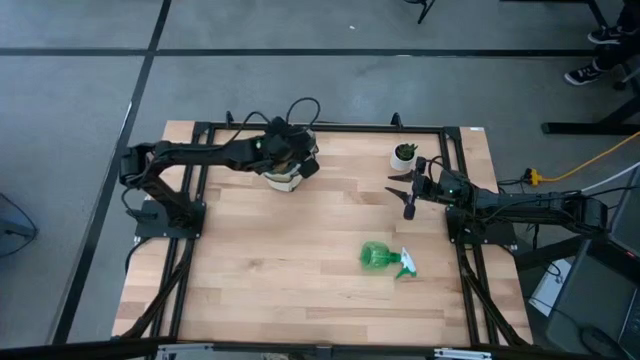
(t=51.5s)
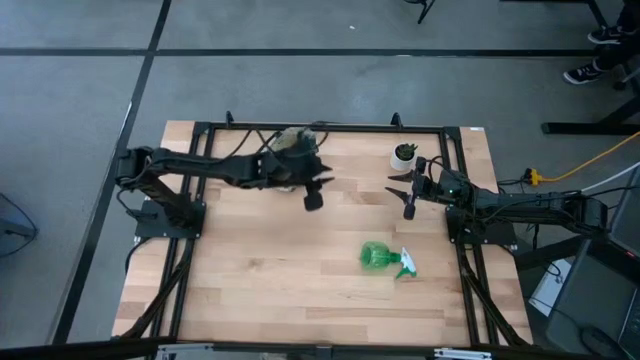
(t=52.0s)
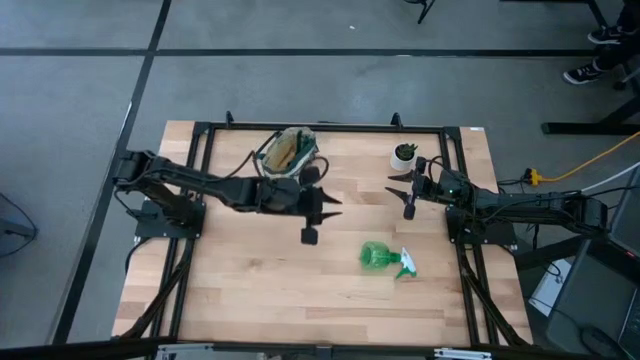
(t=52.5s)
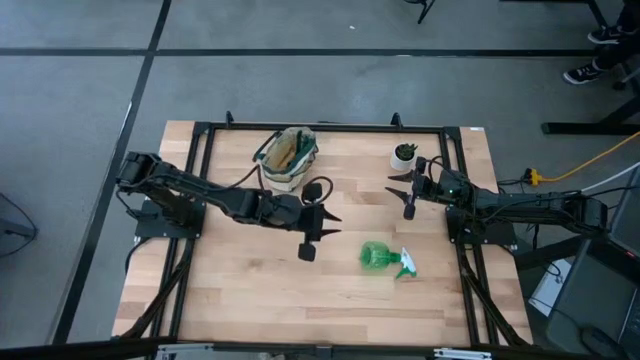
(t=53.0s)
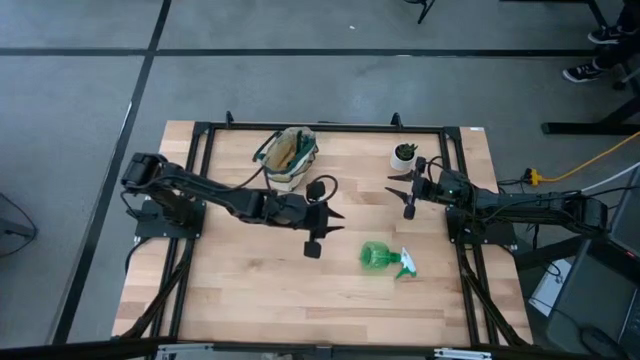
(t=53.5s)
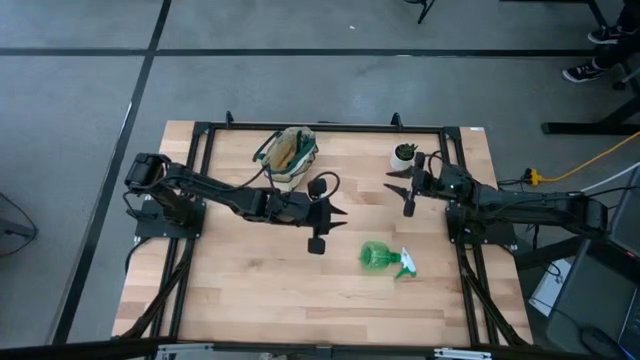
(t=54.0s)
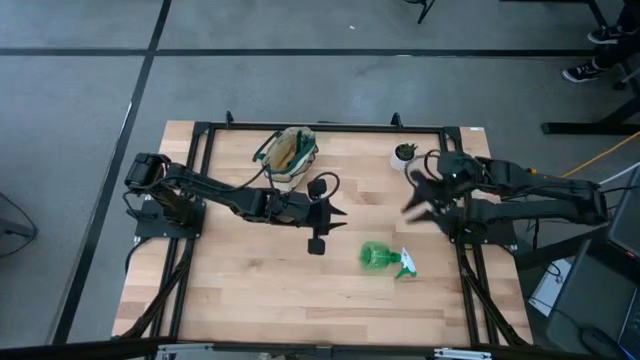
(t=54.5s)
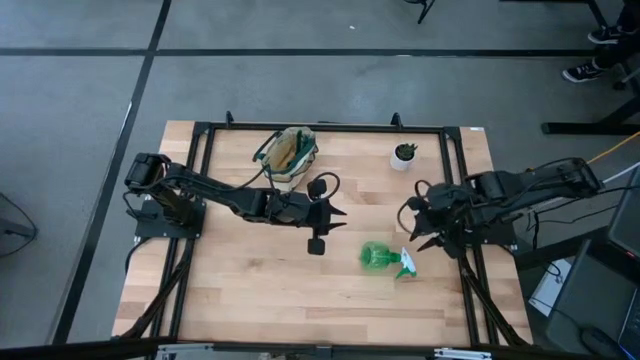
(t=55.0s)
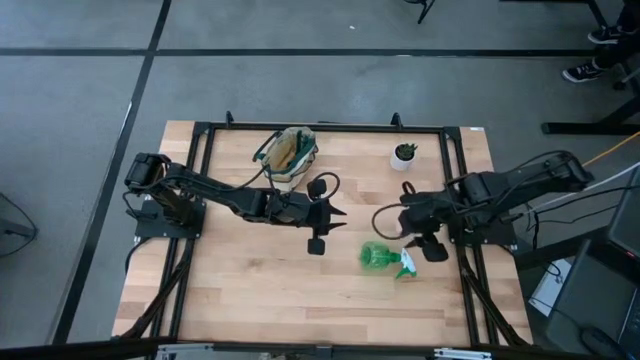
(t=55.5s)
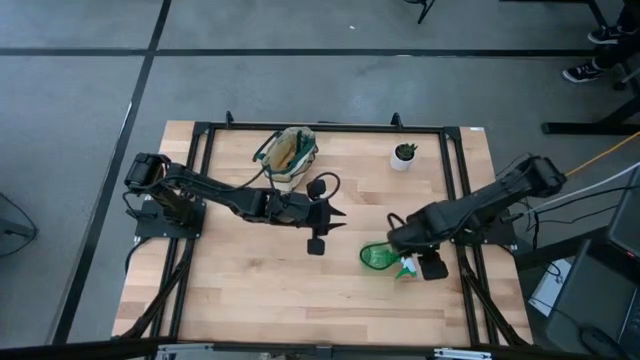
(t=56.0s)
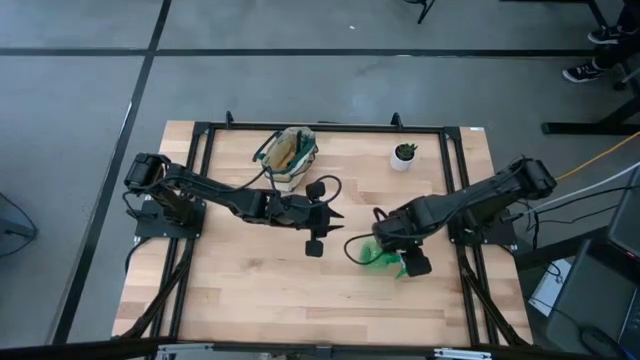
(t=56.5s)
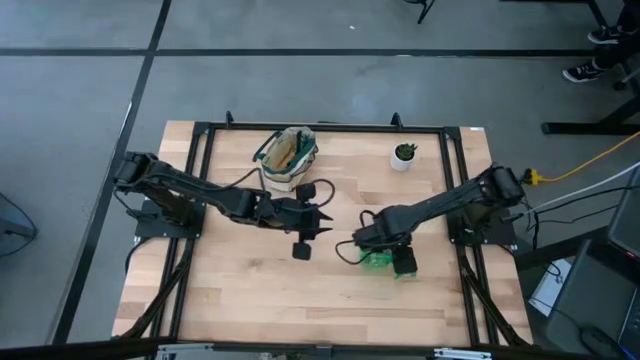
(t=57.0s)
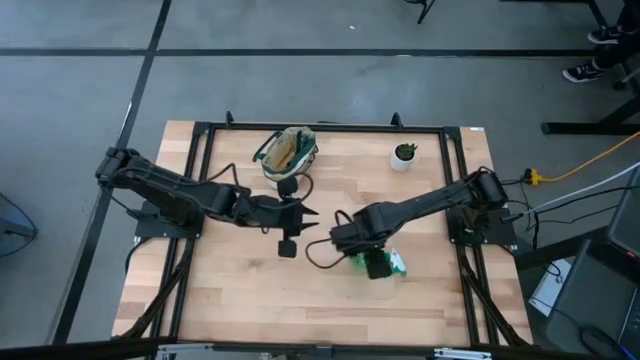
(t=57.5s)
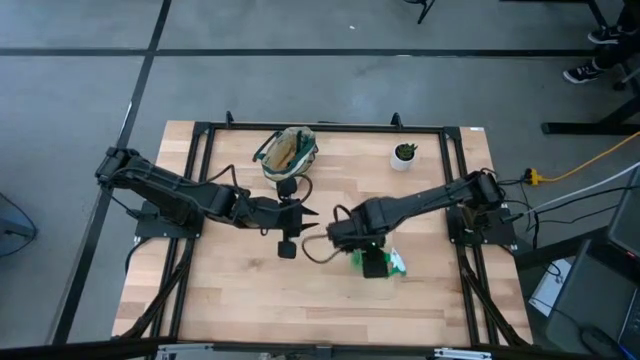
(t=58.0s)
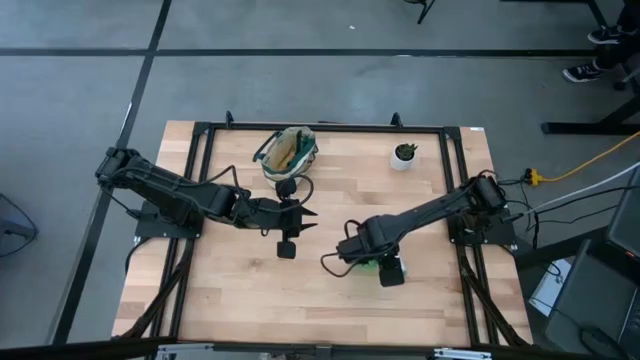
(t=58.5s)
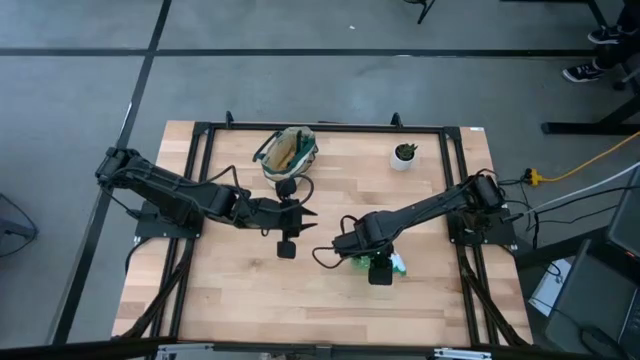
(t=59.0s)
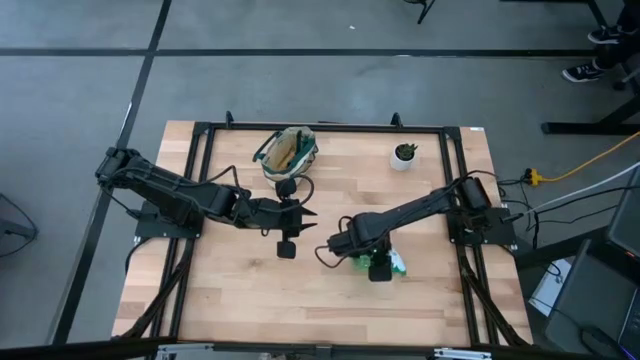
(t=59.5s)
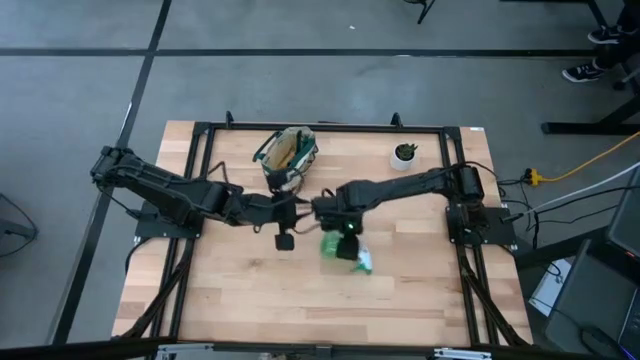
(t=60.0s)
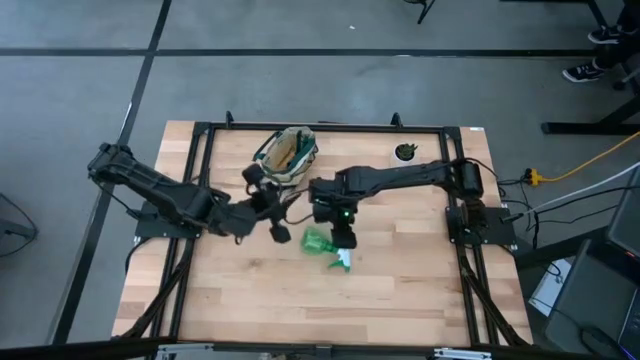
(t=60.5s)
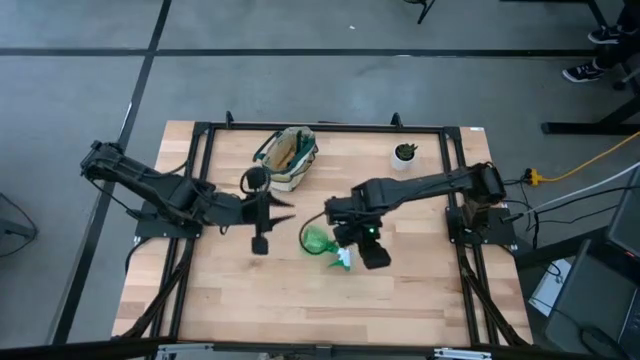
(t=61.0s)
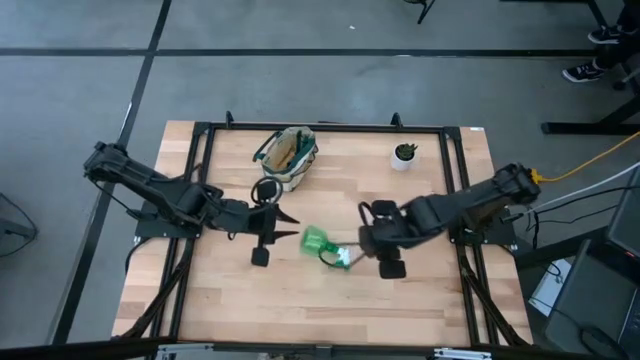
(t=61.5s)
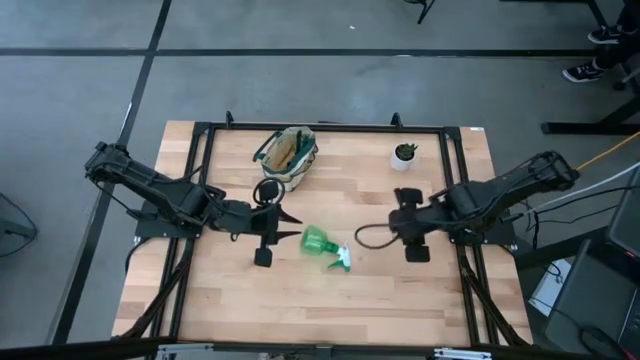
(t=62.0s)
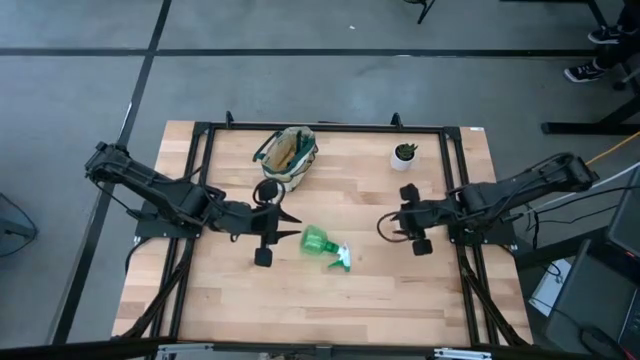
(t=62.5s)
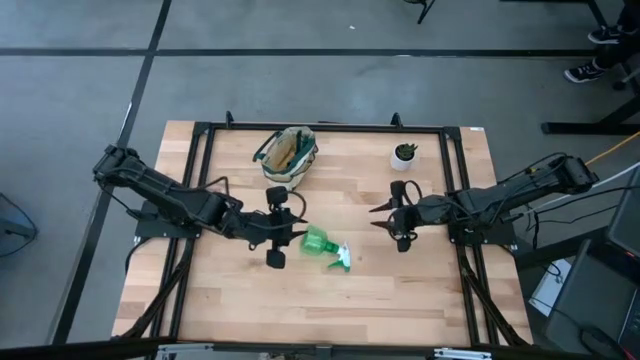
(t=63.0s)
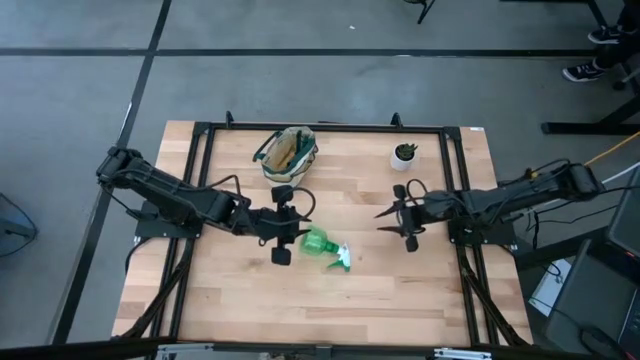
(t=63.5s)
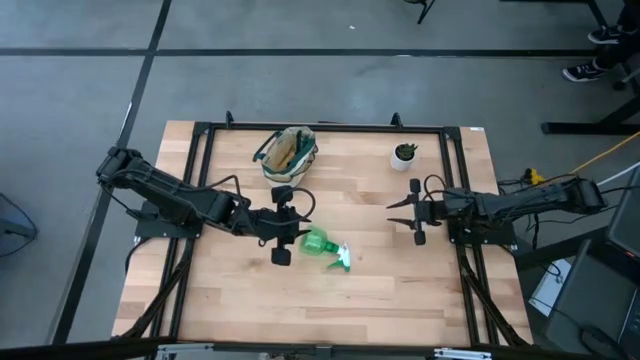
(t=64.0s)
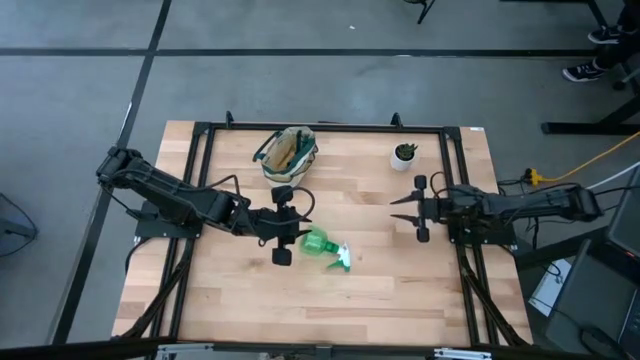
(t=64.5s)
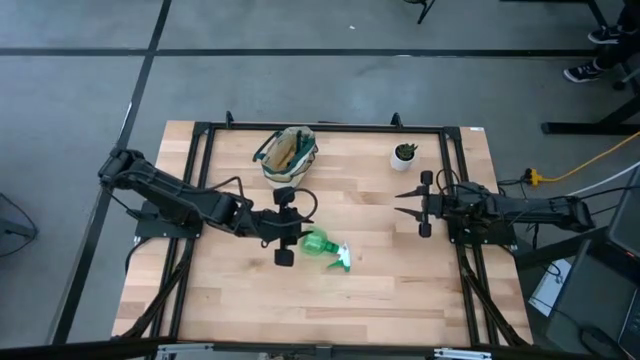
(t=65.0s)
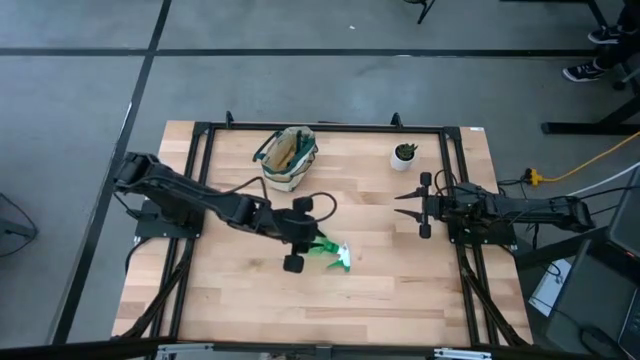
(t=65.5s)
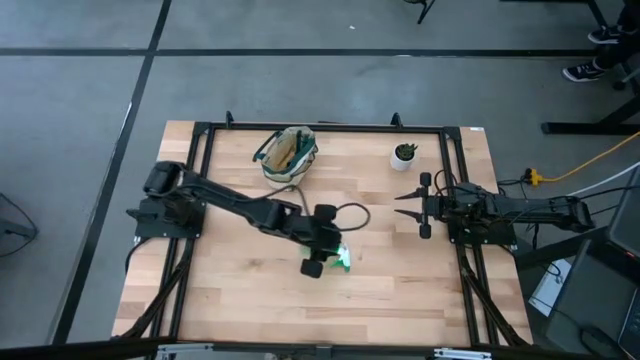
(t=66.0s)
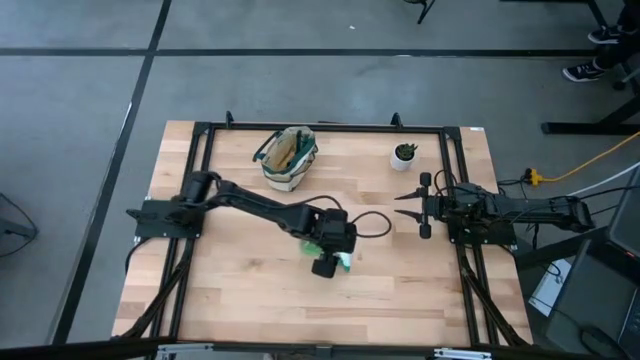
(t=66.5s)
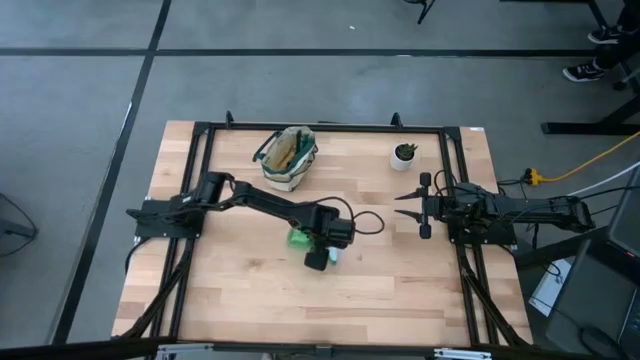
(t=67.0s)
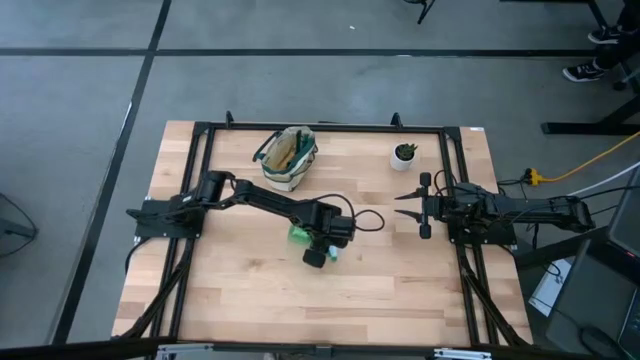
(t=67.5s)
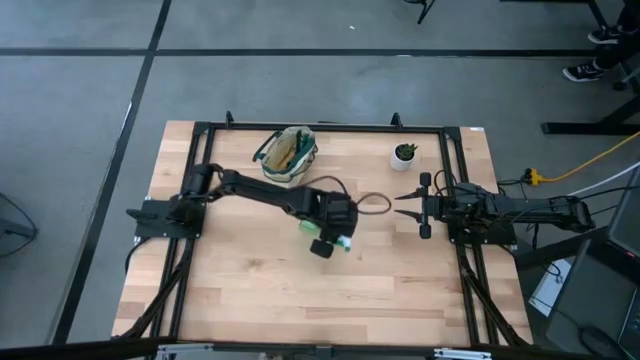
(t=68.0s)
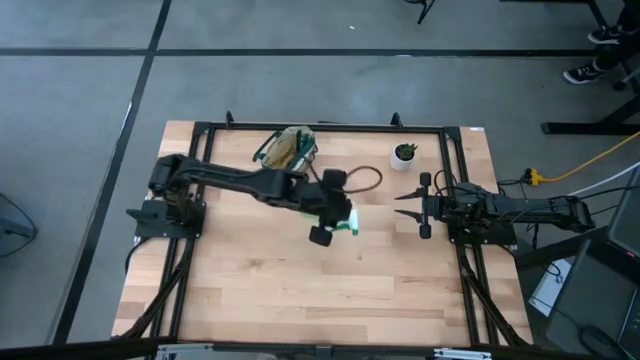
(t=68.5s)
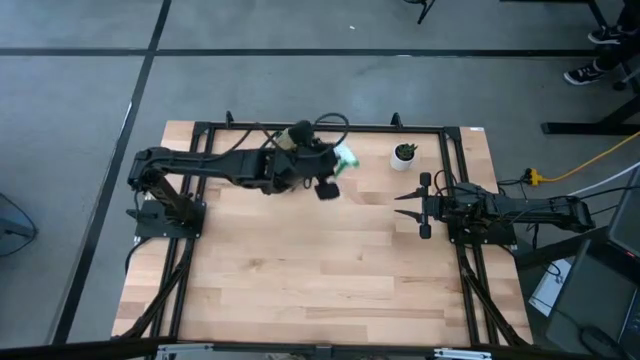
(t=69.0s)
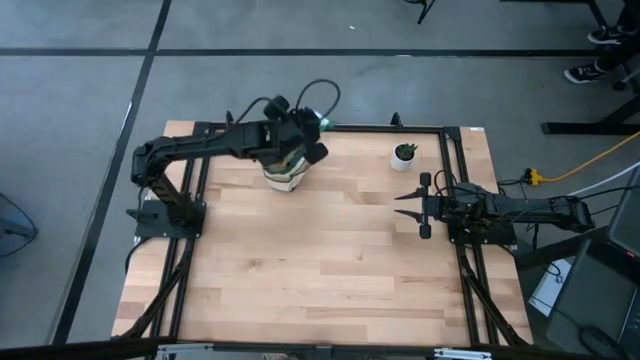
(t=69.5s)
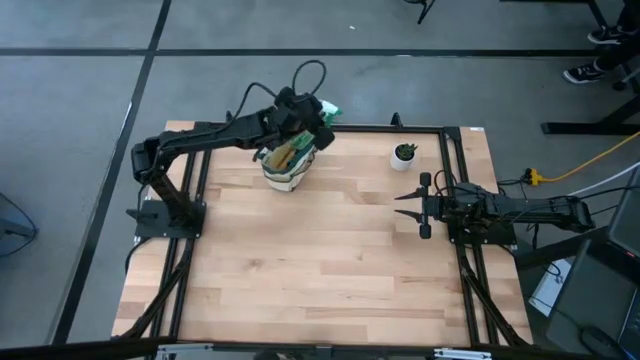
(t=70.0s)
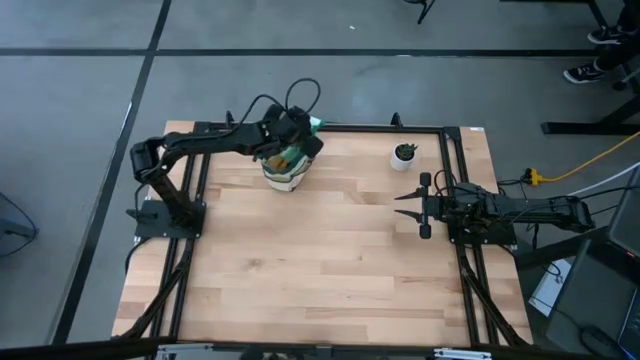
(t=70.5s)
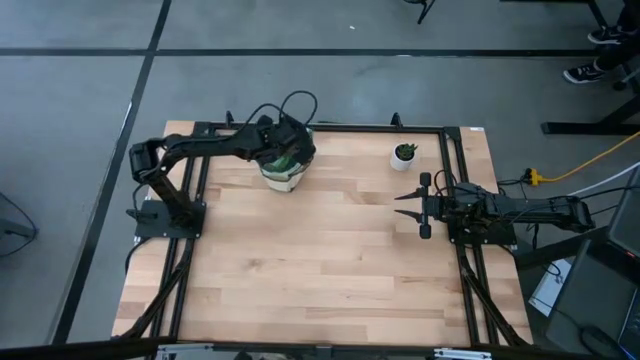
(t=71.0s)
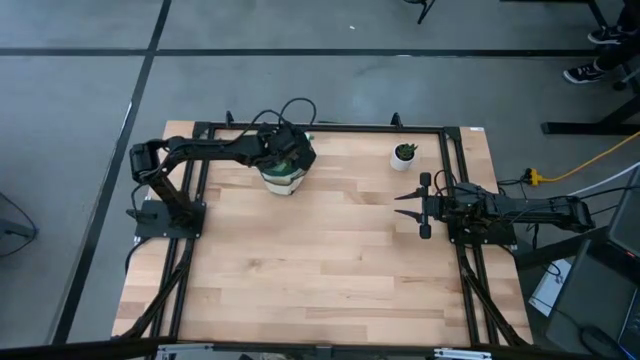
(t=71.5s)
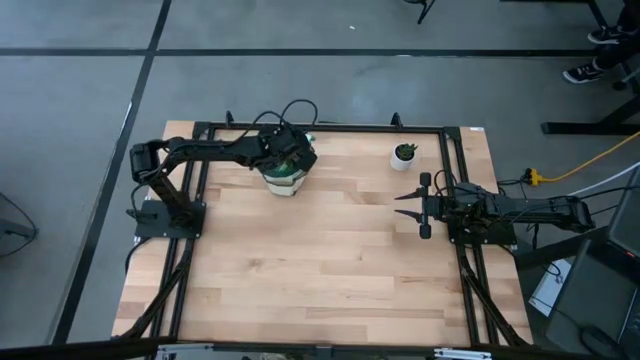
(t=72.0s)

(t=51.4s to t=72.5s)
Task: Pick & Place Garden tools in Gardening bag
Put the spray bottle into the gardening bag
